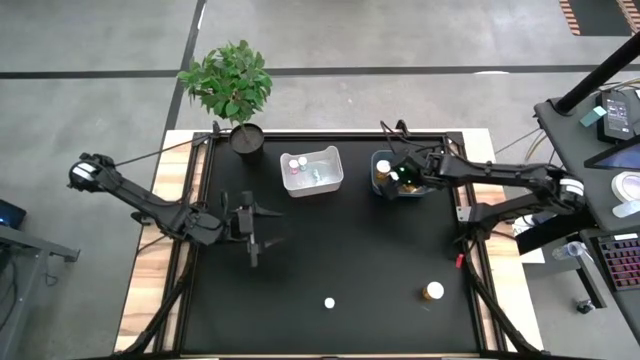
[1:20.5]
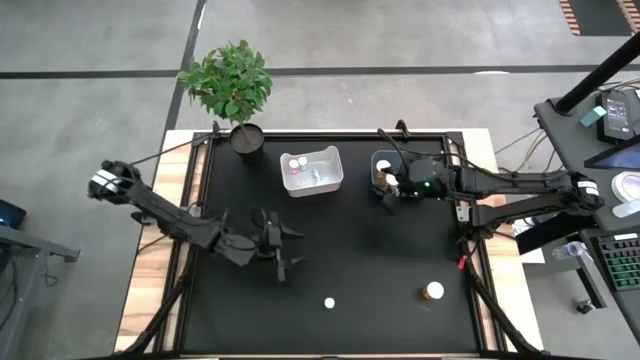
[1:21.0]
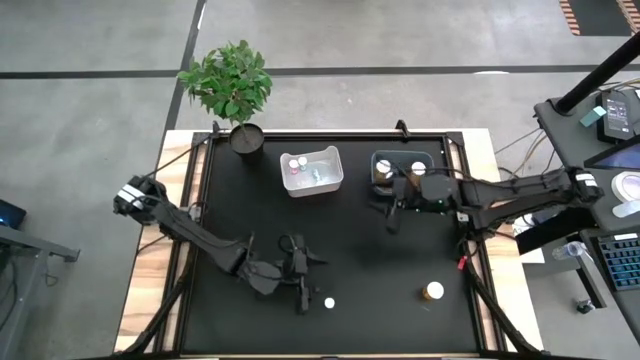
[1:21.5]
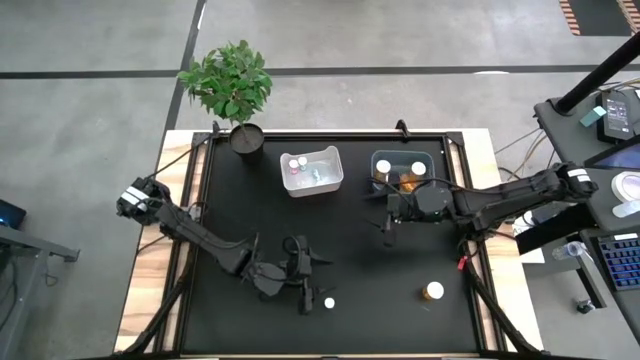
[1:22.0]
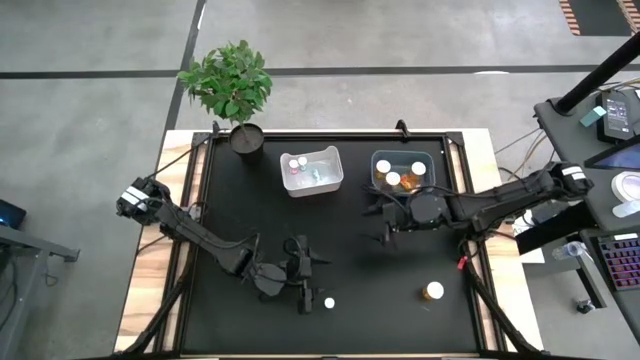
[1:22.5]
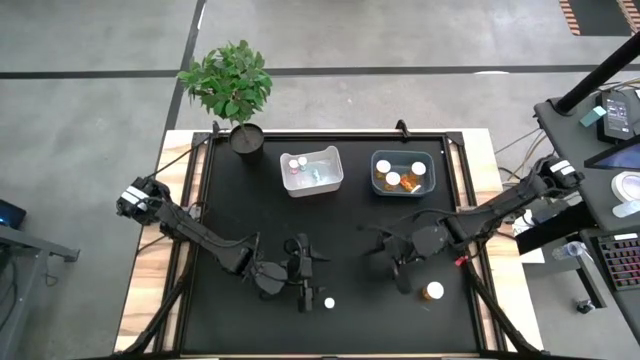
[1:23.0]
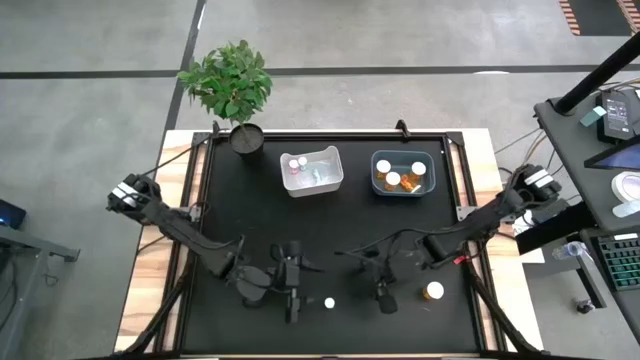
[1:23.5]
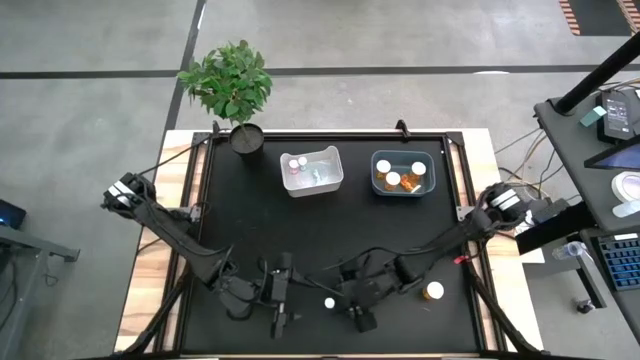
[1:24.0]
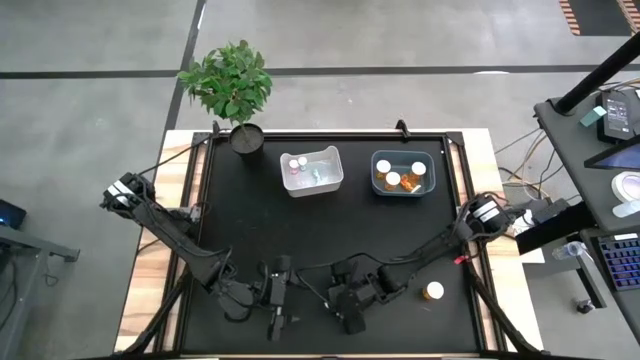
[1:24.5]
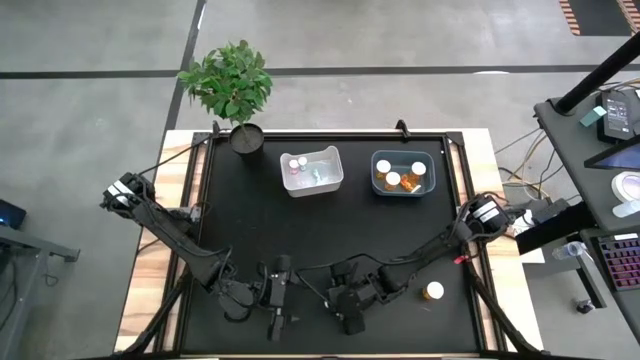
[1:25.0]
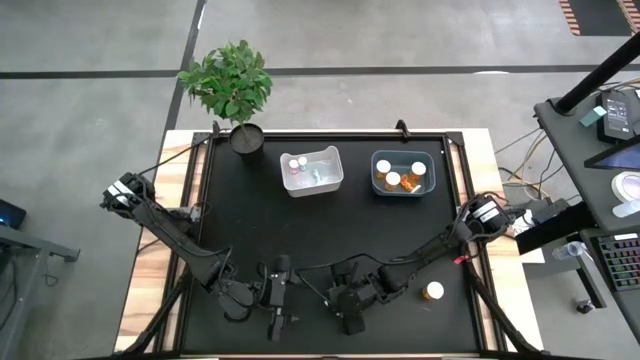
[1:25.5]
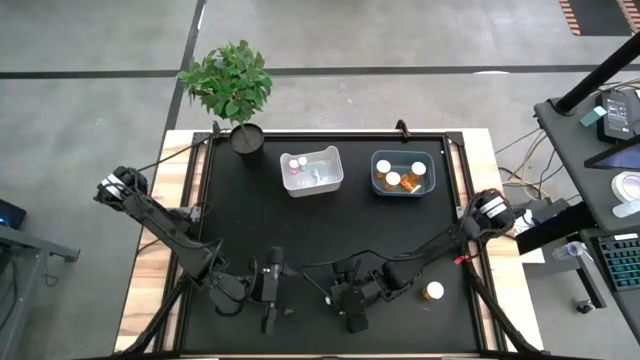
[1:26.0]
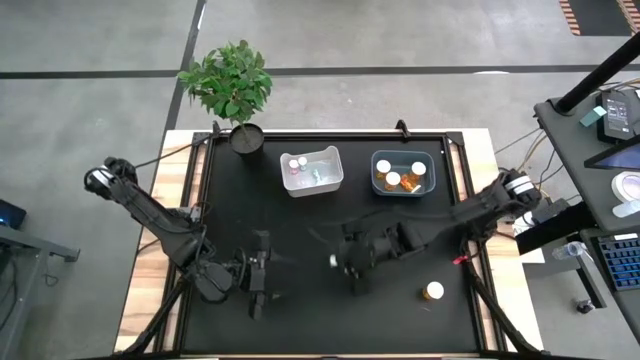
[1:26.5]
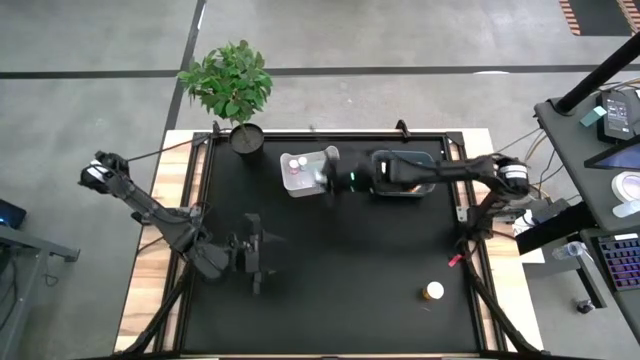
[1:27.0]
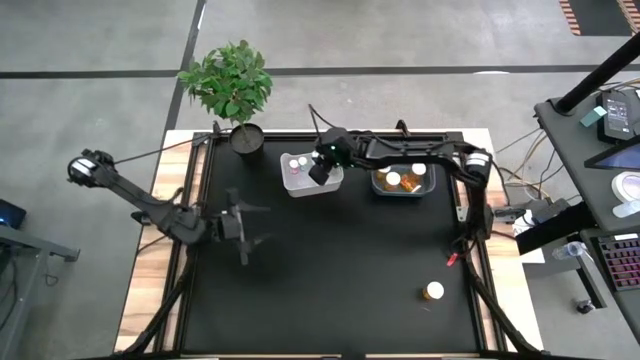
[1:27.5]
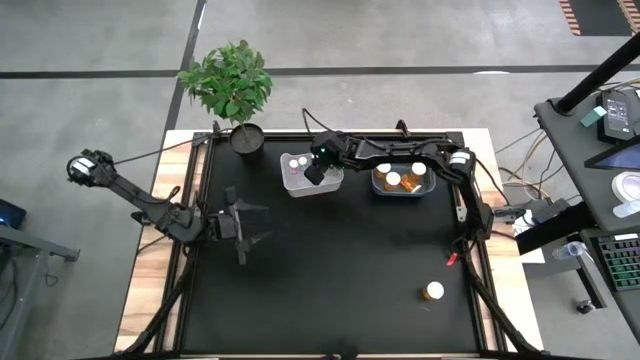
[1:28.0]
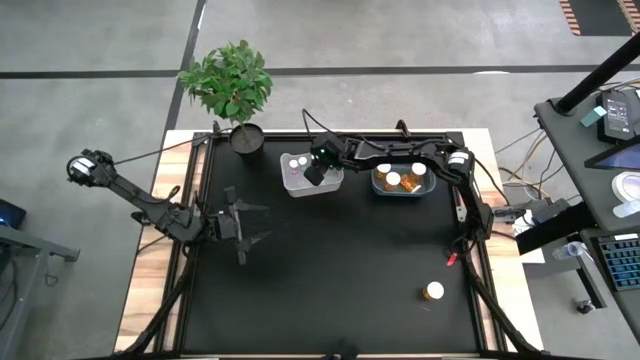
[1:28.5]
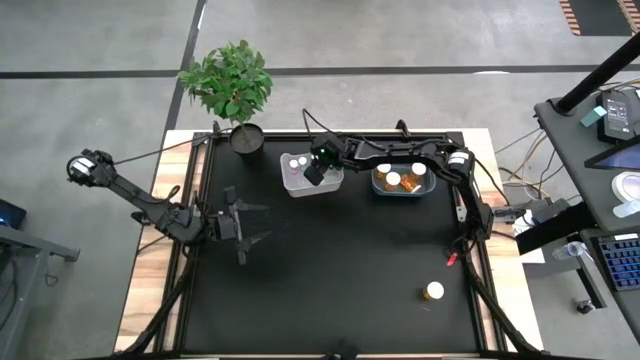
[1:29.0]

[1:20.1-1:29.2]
Task: Pick and place medicine bottles into bin by pill shape (circle, oval)
Put the blue tablet bottle into the white bin

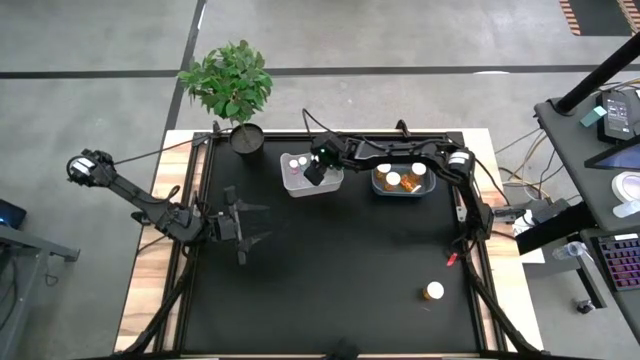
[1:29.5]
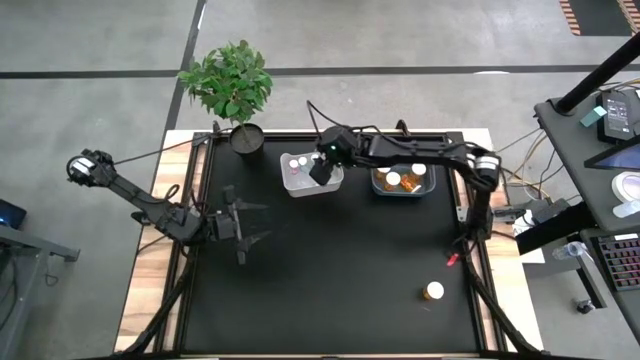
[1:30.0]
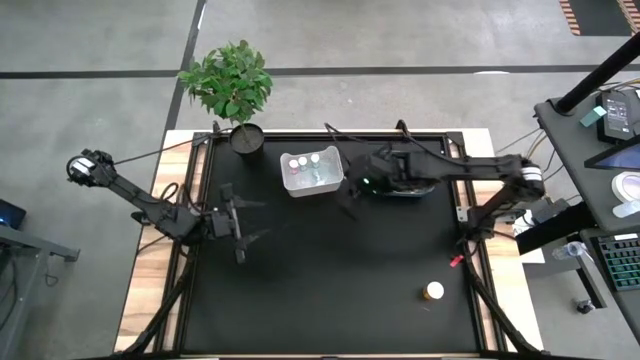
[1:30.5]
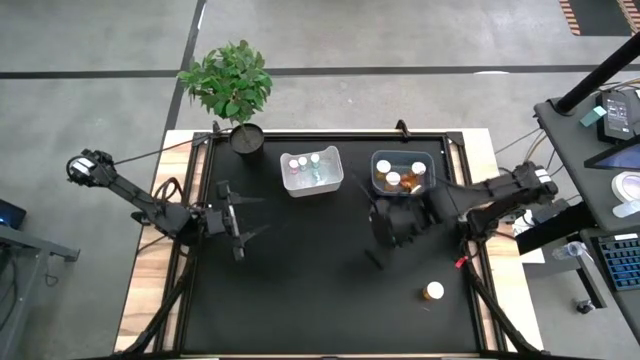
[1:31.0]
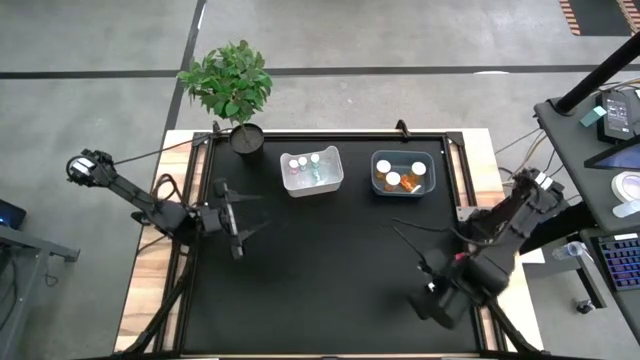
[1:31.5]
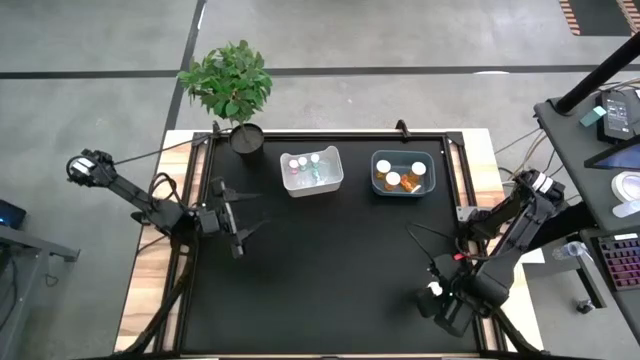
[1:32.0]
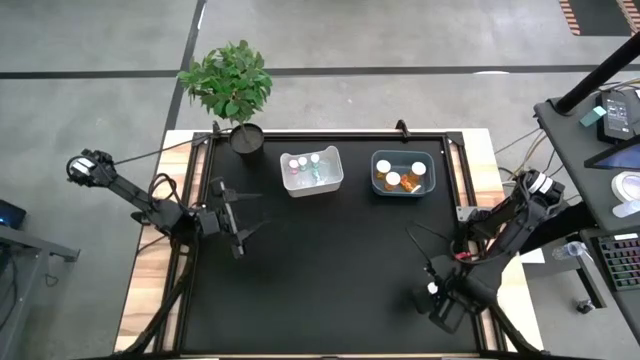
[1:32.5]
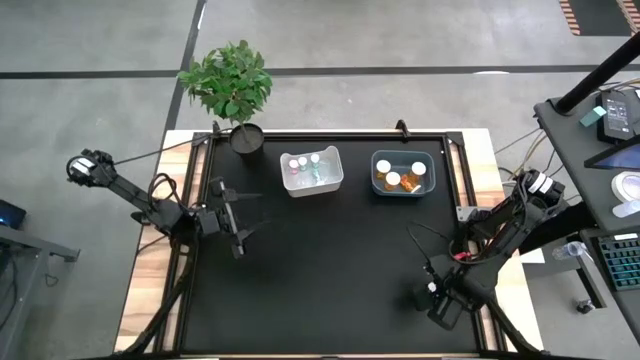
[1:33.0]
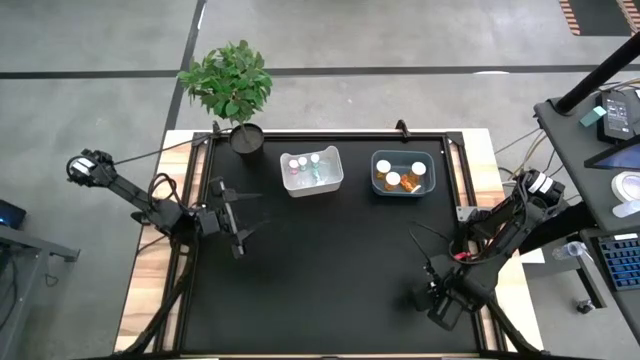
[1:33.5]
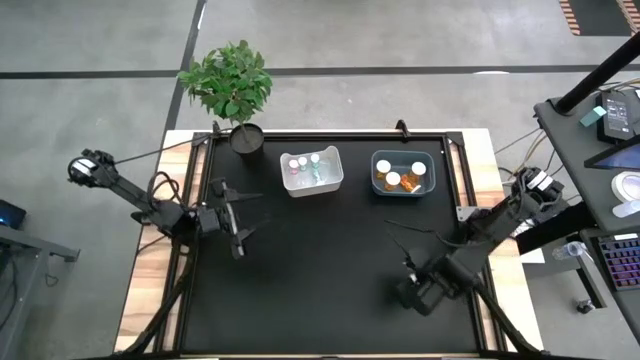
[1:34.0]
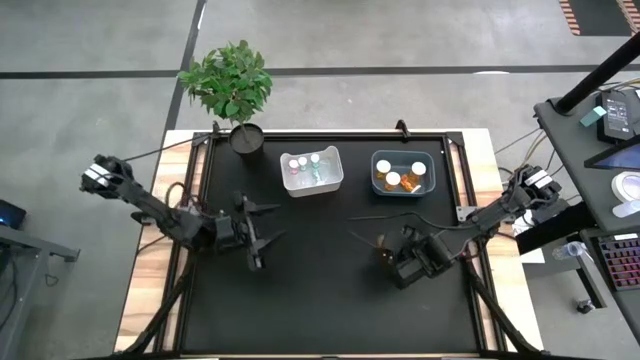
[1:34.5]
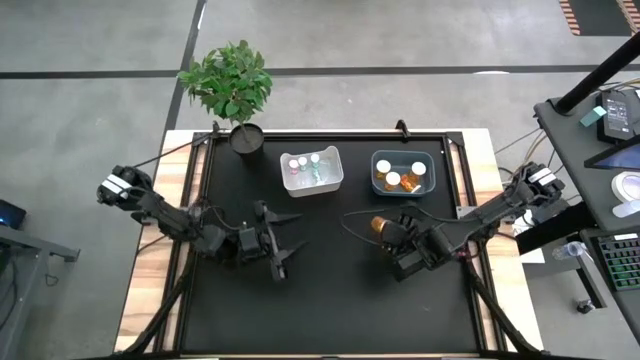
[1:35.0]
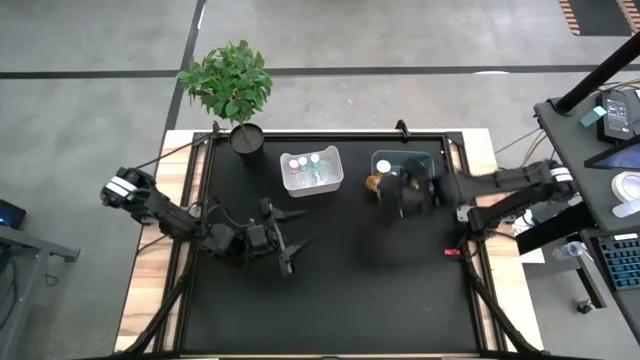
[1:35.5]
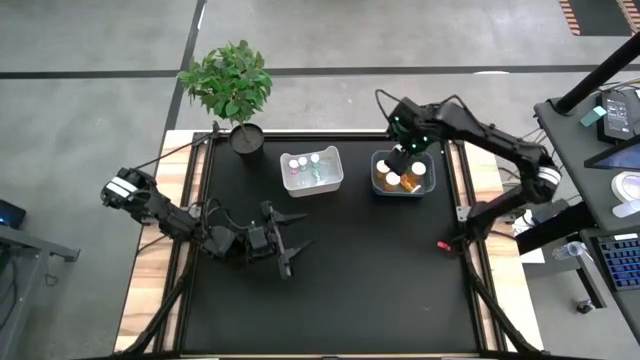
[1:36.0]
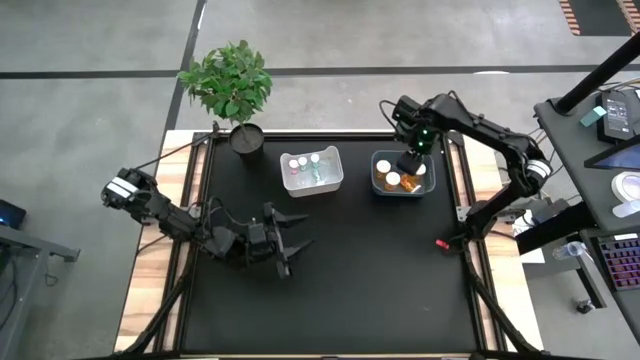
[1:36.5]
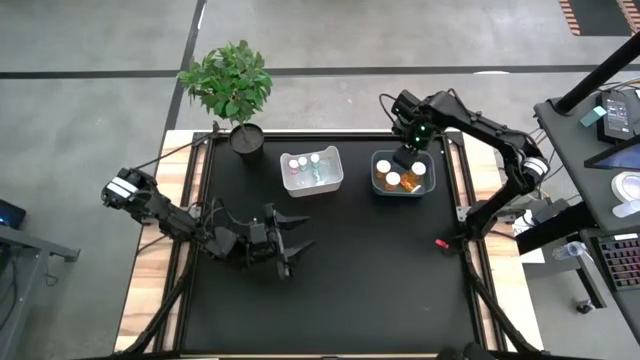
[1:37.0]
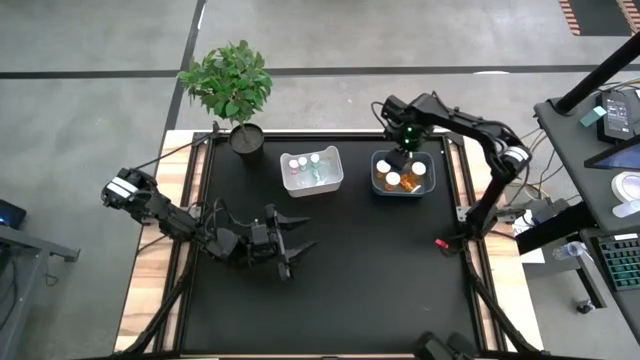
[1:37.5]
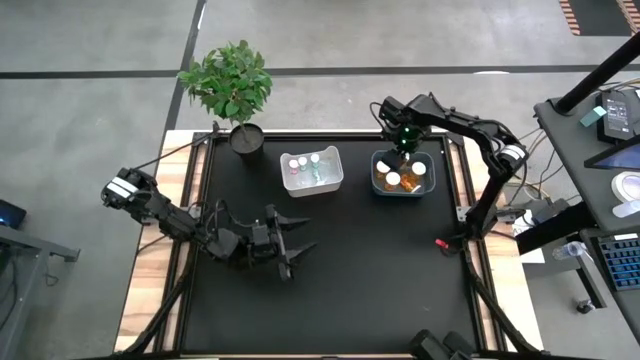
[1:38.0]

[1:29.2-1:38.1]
Put the orange capsule bottle into the blue bin

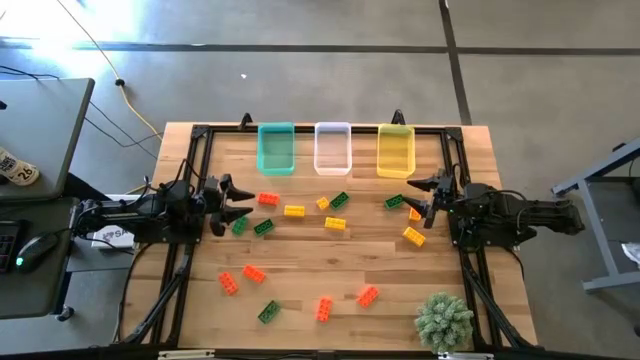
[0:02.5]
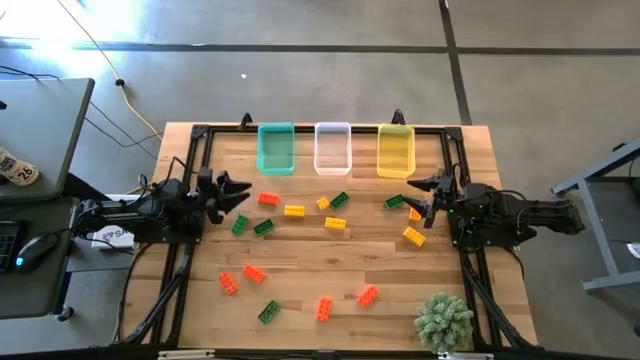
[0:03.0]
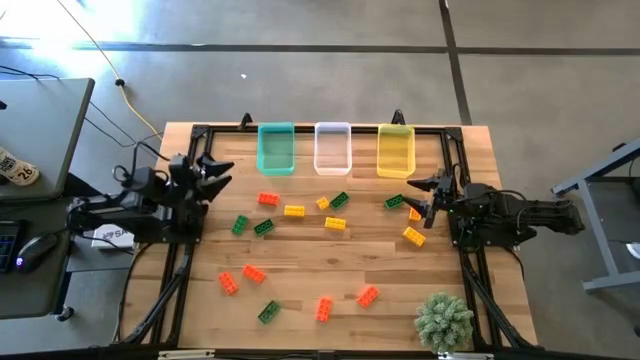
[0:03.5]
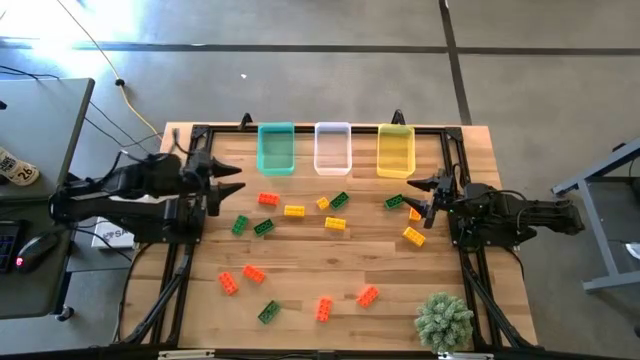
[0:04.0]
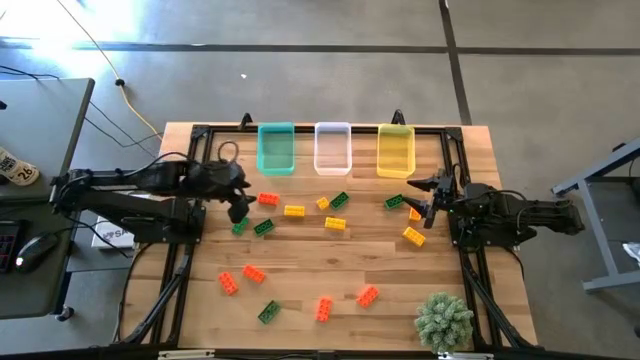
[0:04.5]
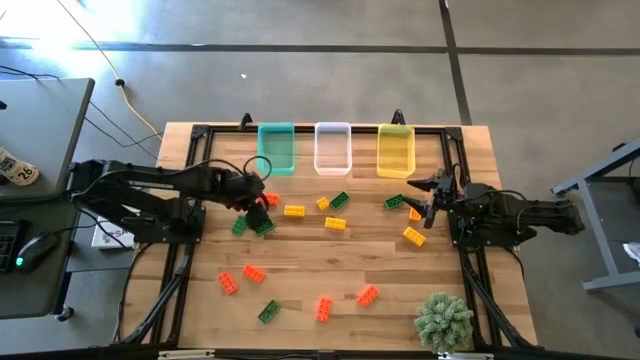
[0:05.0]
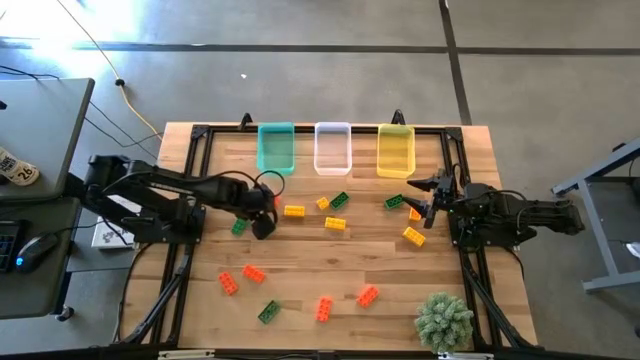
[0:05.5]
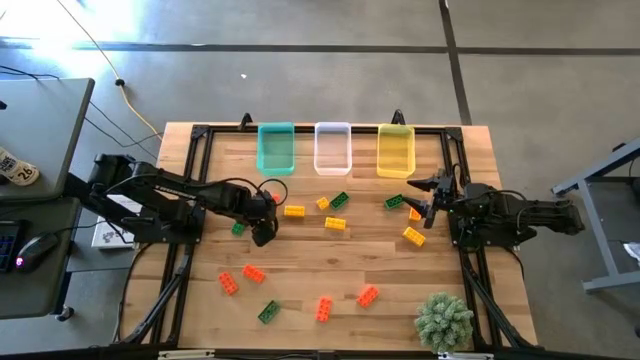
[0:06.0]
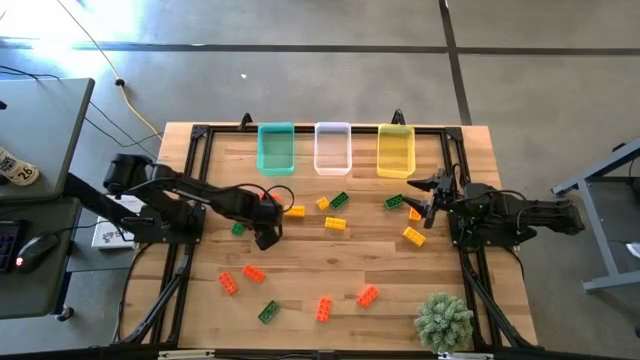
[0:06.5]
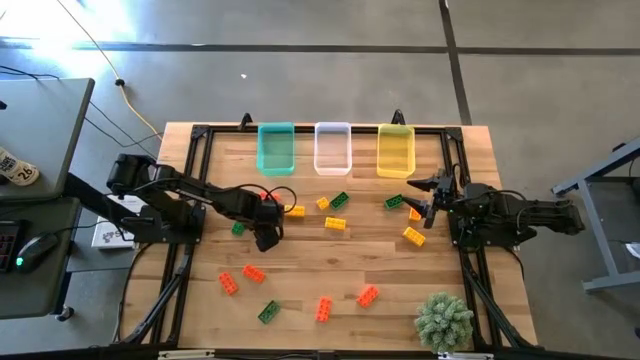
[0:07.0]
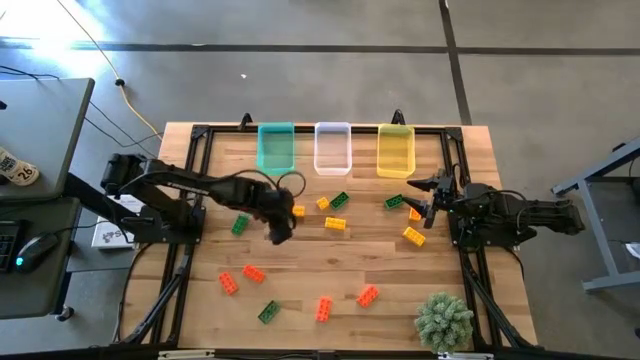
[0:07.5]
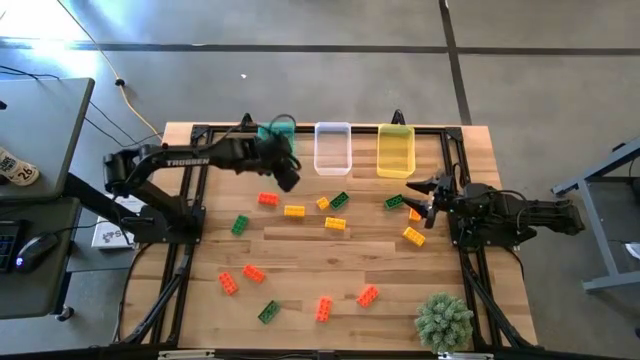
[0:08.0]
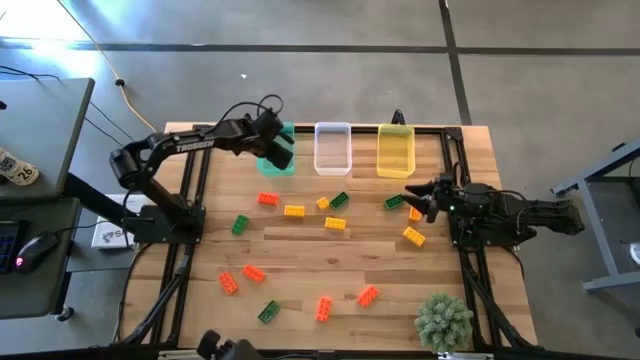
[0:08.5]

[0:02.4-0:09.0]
Task: Sort & place blocks by color
Put the green game piece into the green bin
